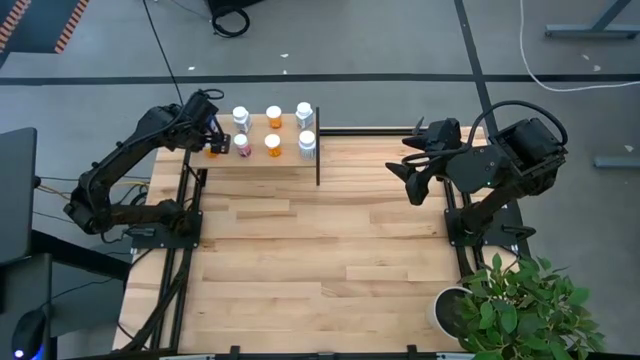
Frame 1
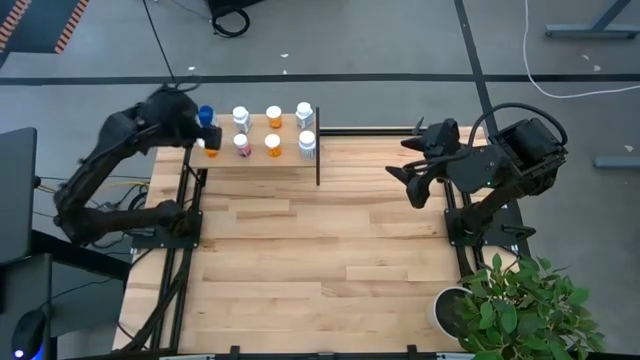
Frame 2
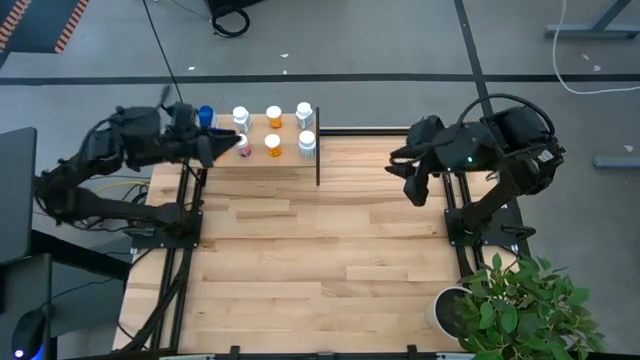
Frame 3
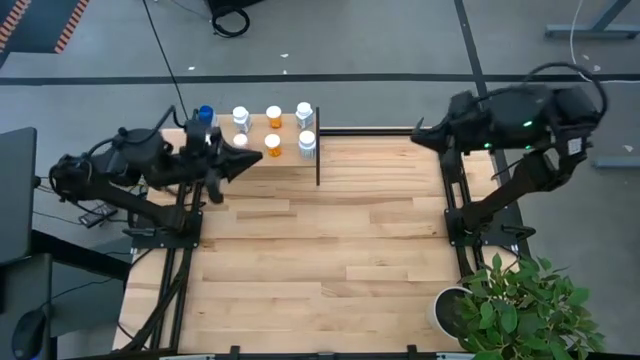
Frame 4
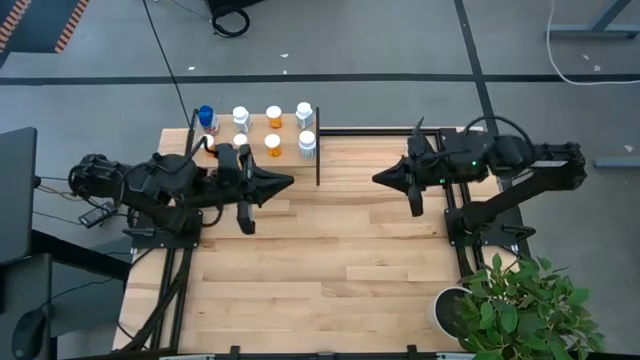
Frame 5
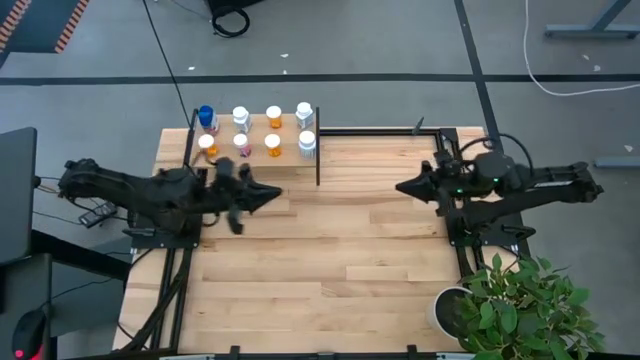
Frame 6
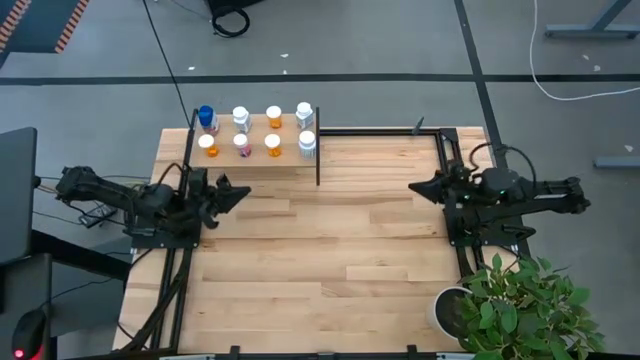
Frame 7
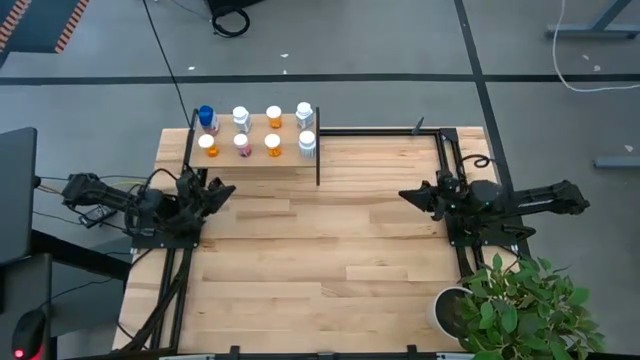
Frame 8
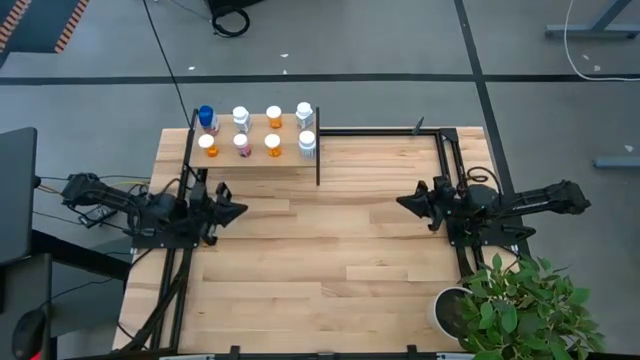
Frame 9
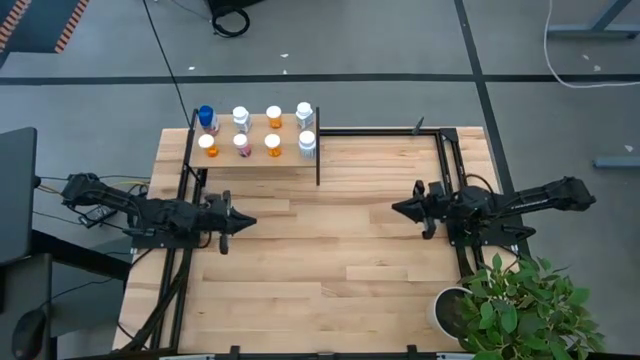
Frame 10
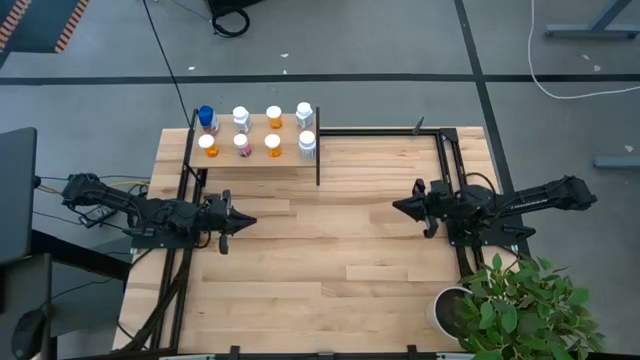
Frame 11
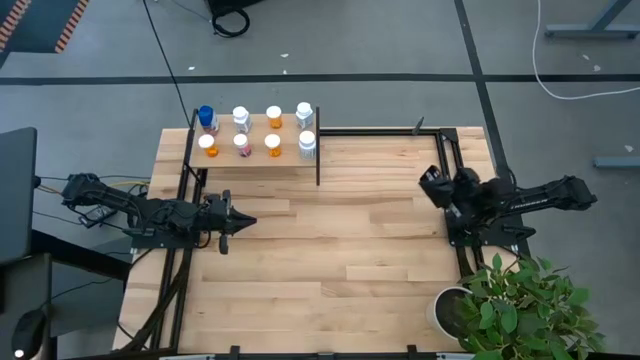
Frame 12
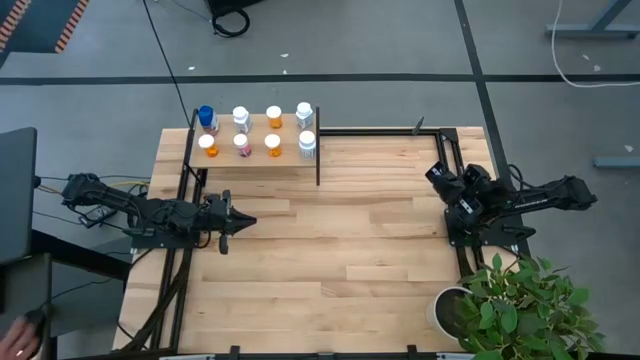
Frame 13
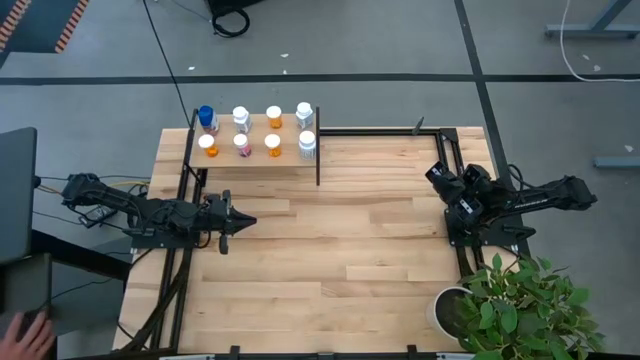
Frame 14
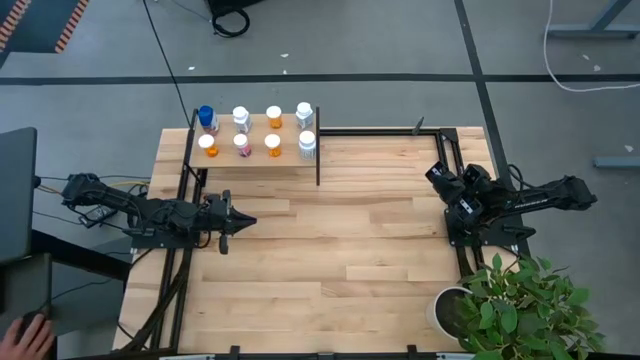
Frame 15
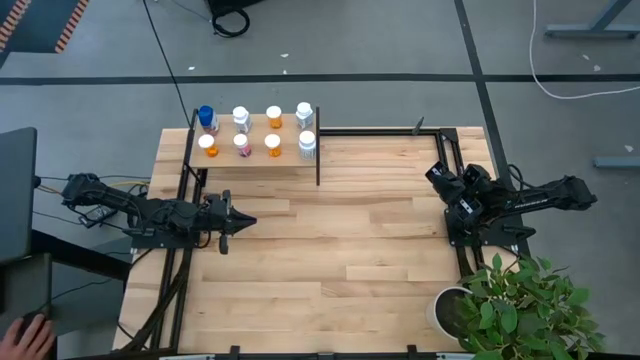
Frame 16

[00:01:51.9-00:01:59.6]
Task: Pick and place medicine bottles onto shelf by color
Return to Home Position

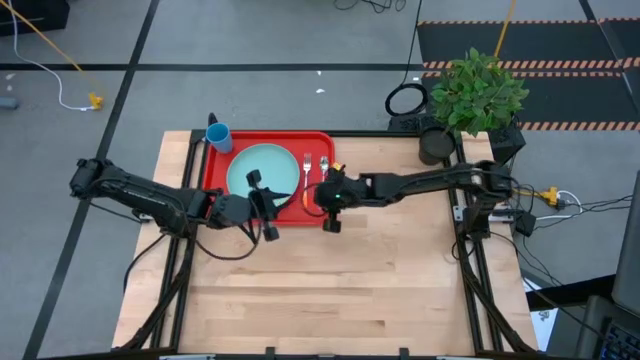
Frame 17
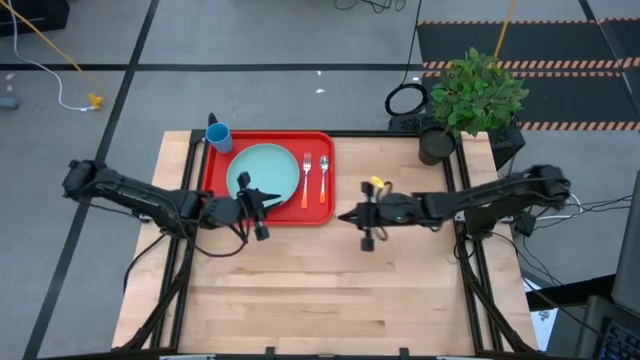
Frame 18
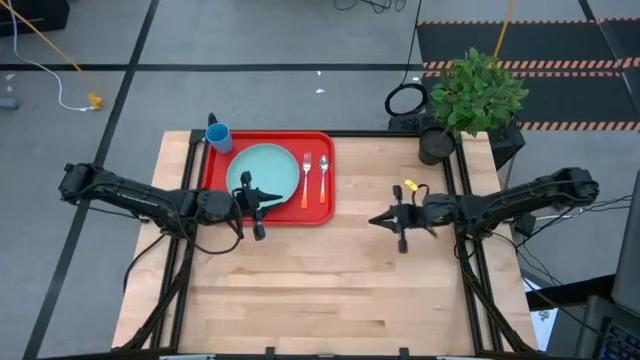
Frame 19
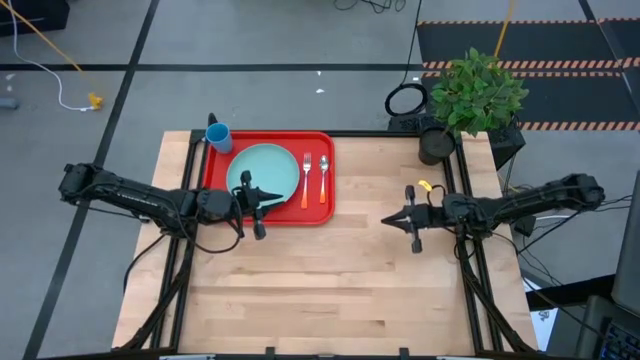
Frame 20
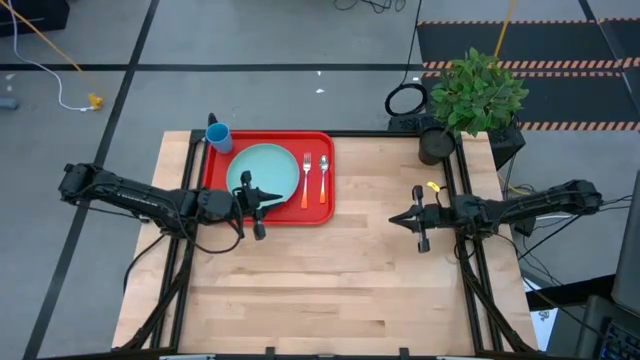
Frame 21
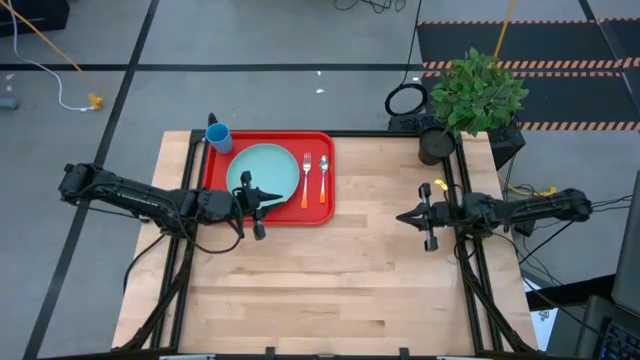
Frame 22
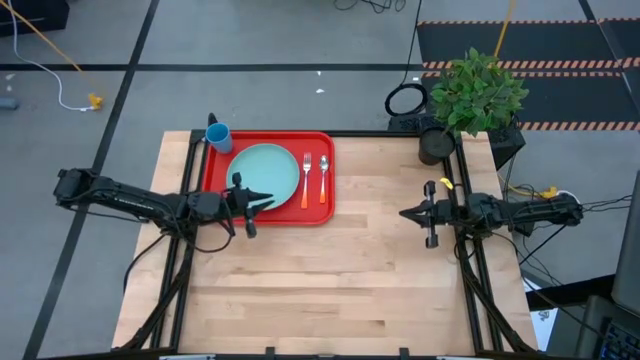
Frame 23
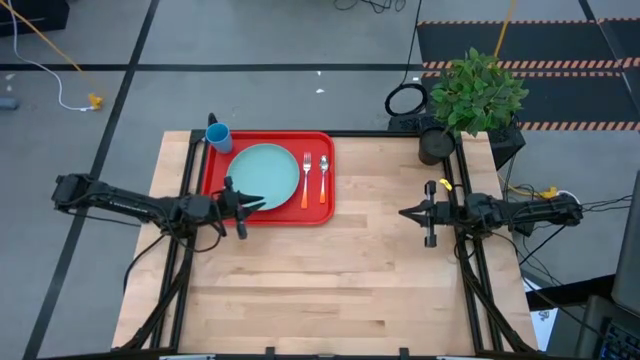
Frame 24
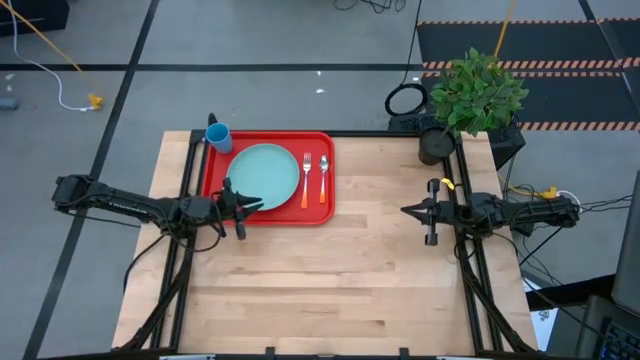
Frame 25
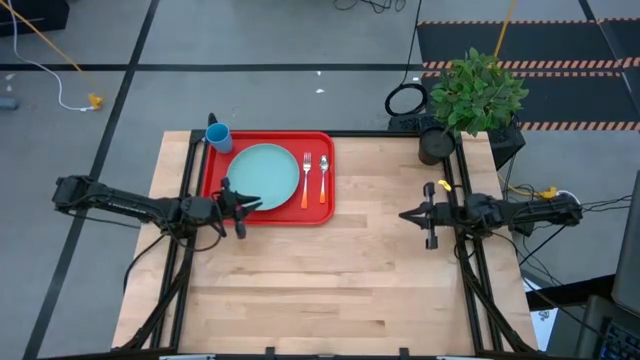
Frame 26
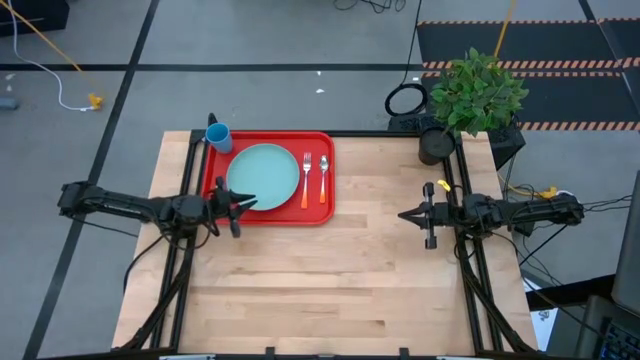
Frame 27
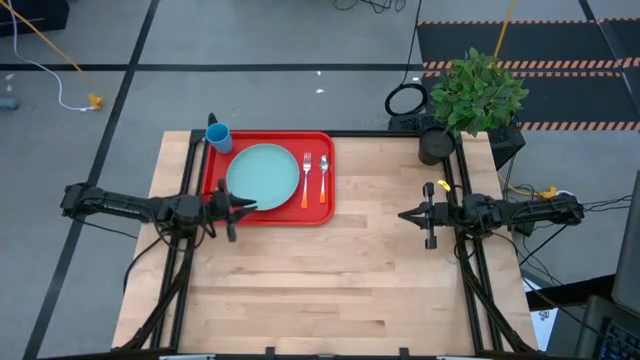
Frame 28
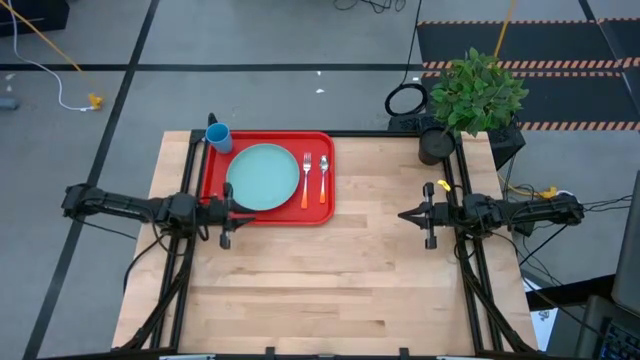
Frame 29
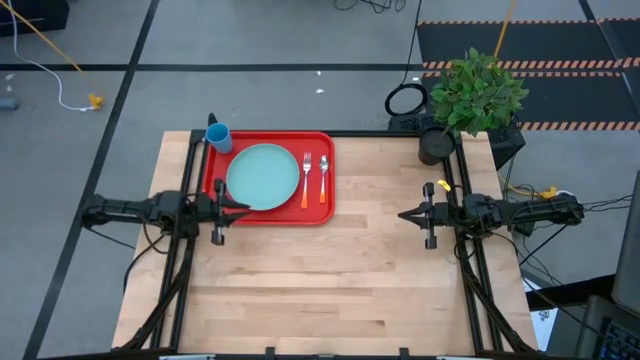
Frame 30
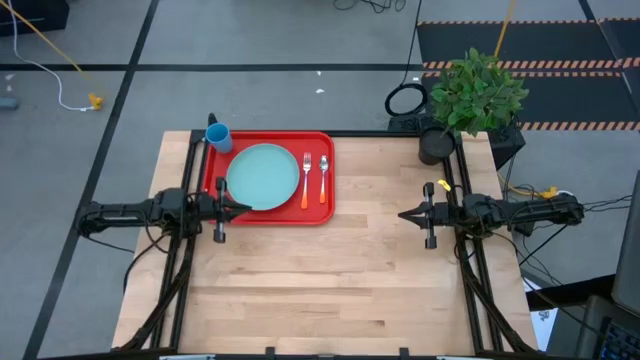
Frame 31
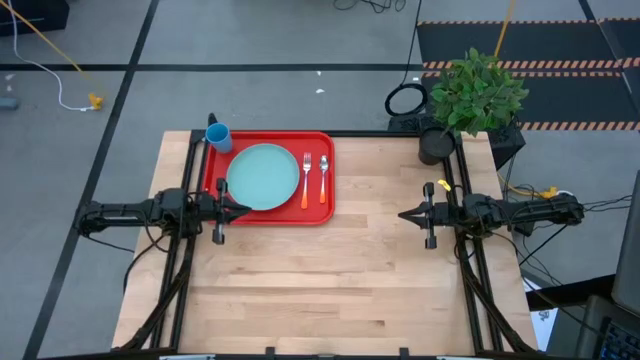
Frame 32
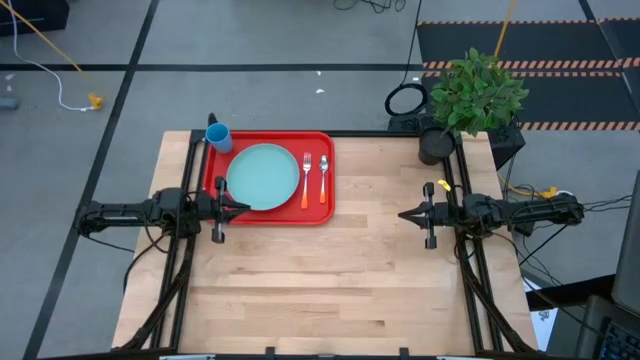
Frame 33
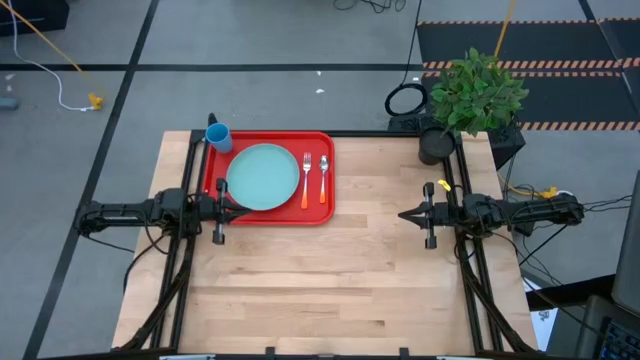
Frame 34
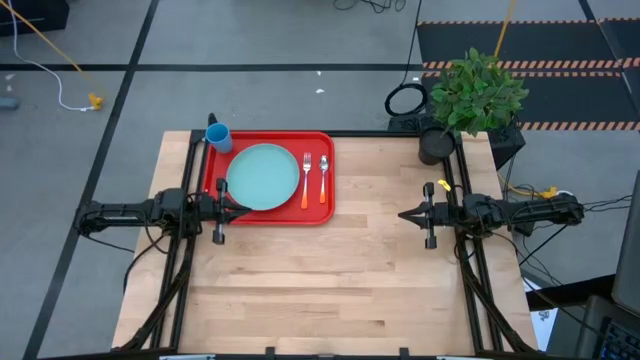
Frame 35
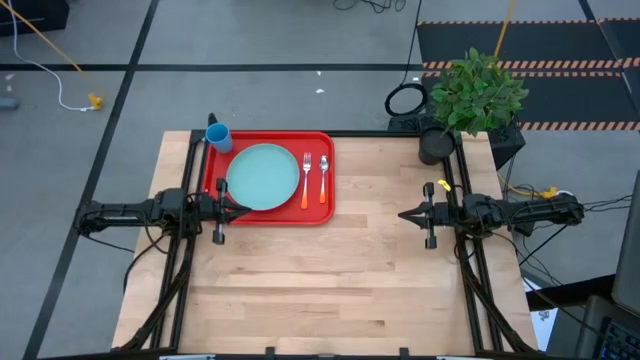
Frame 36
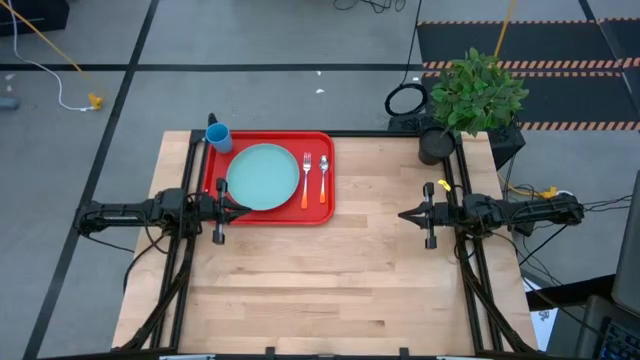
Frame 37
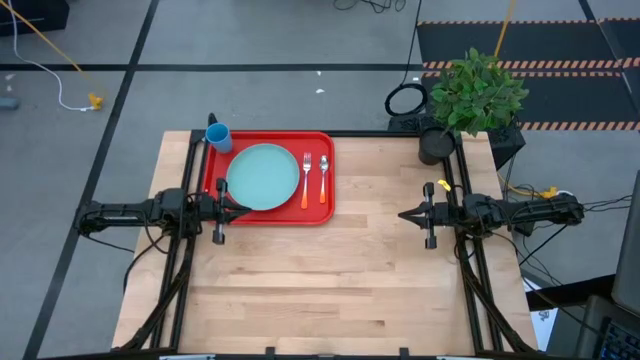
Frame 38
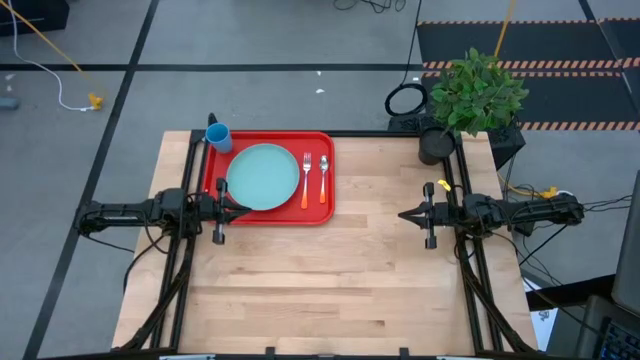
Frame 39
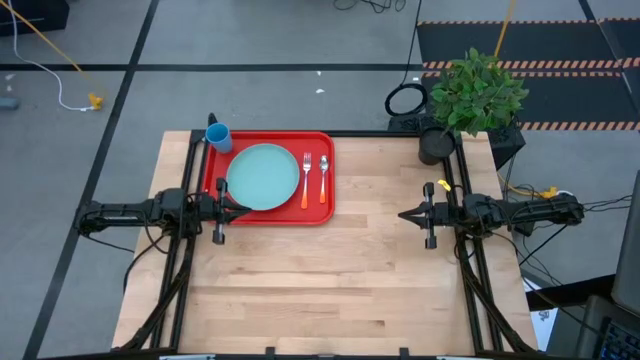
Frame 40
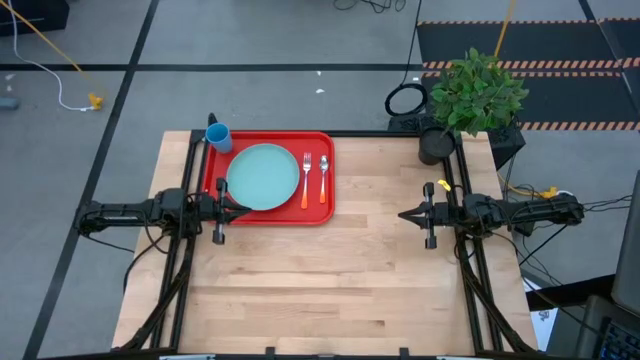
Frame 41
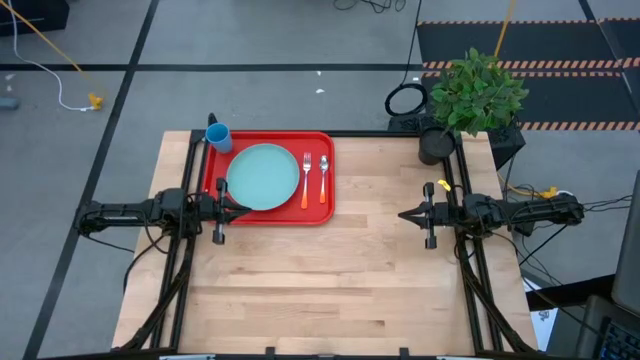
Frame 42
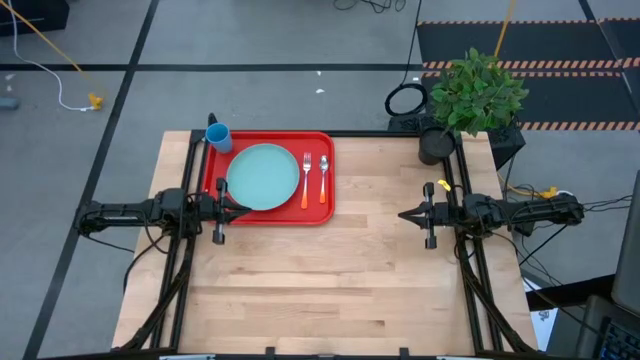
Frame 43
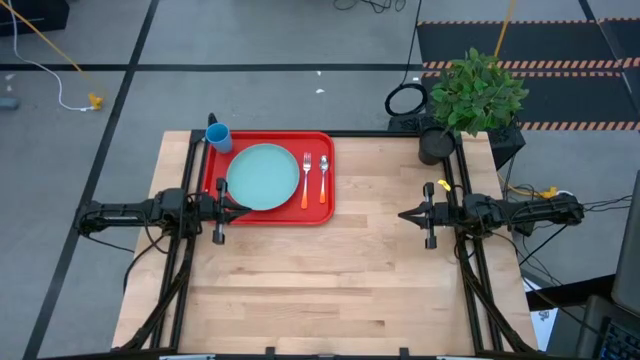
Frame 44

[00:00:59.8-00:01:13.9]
Task: Pick and place plate/cup/fork/spoon on tray
Return to Home Position
